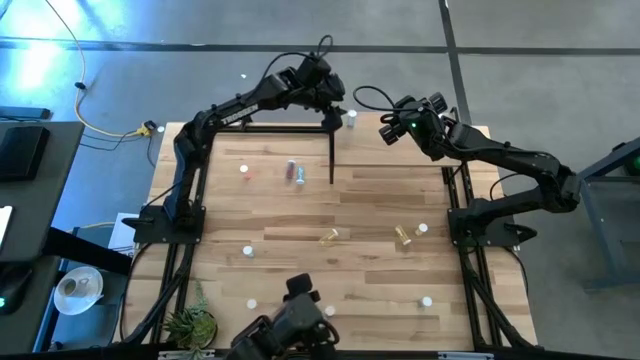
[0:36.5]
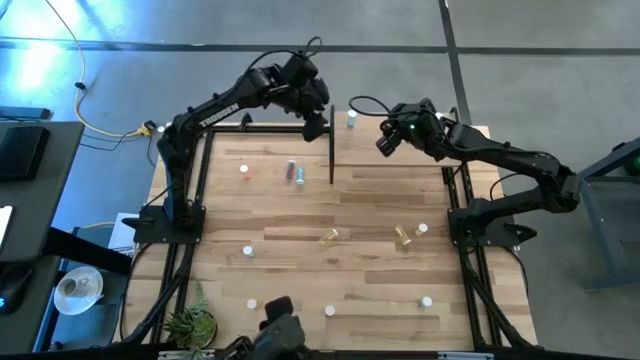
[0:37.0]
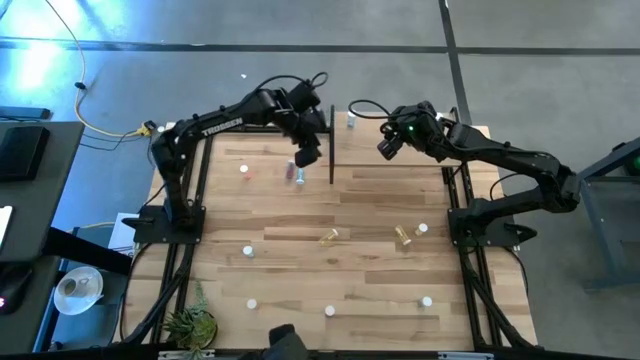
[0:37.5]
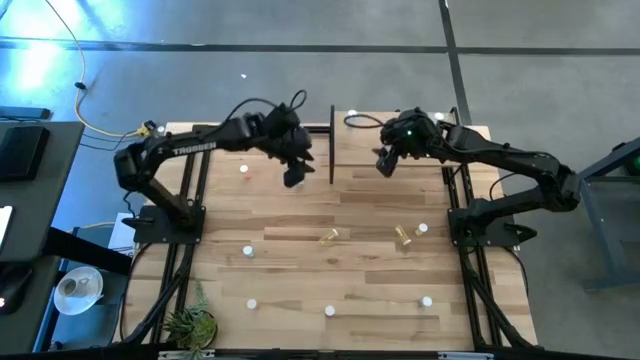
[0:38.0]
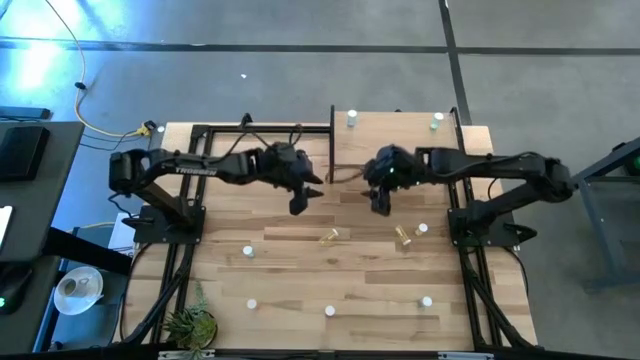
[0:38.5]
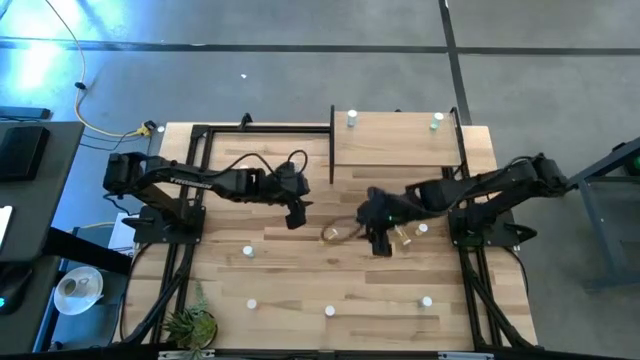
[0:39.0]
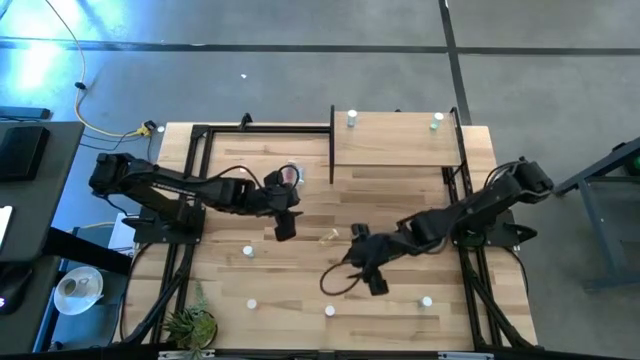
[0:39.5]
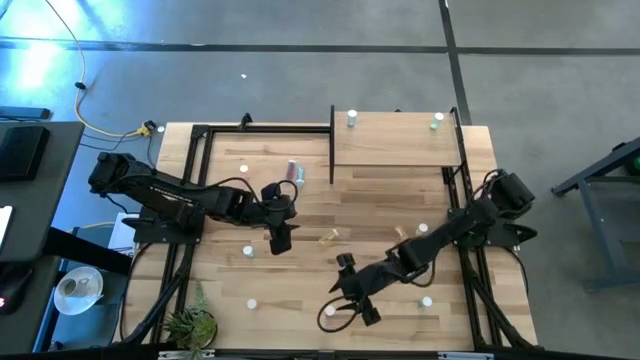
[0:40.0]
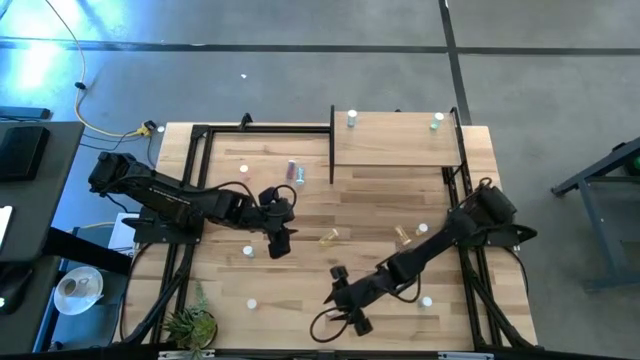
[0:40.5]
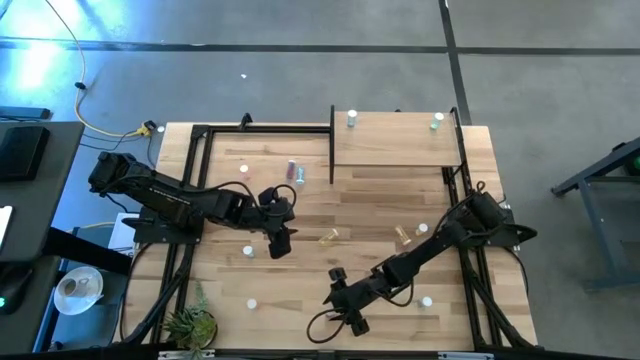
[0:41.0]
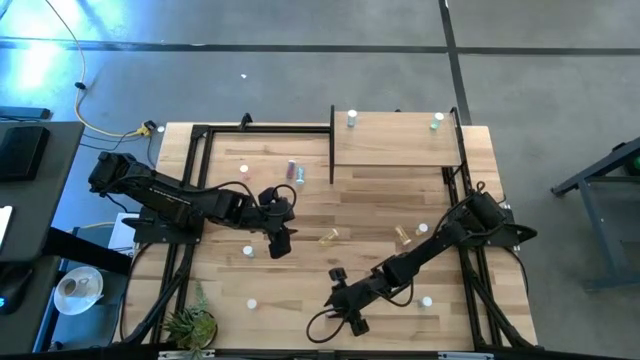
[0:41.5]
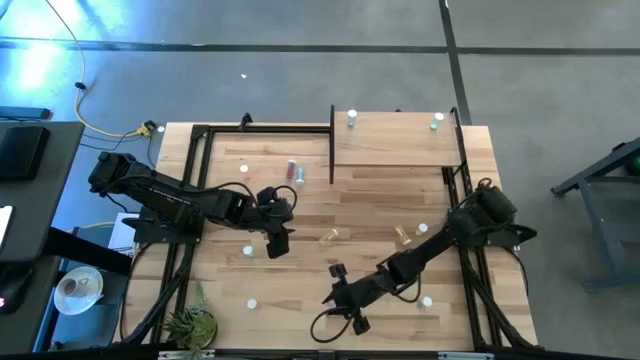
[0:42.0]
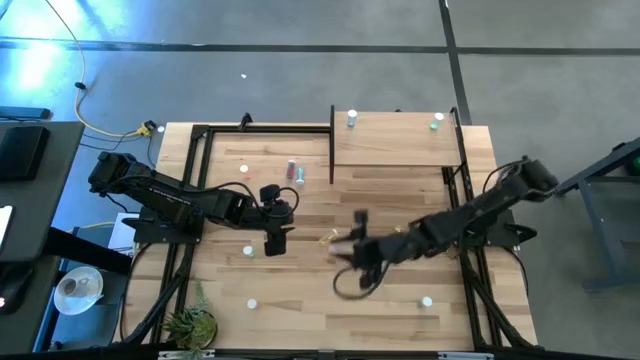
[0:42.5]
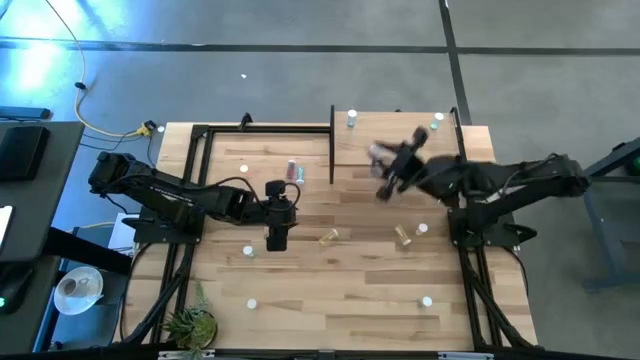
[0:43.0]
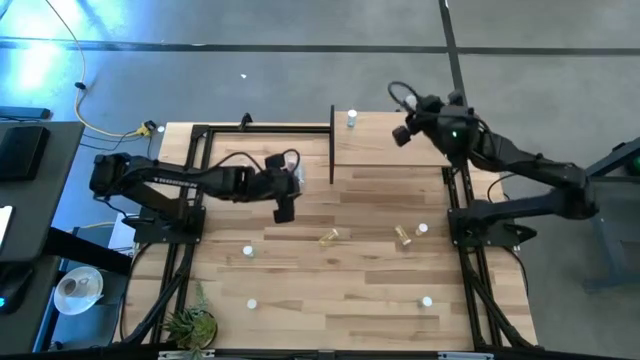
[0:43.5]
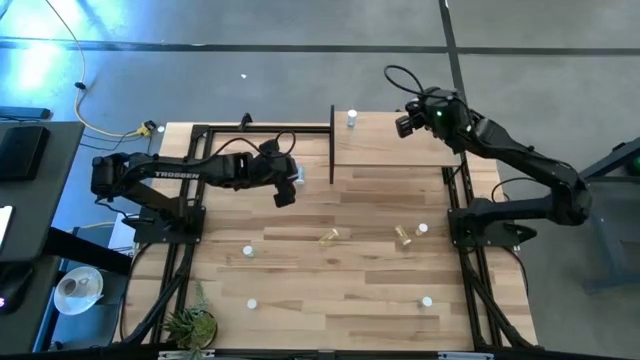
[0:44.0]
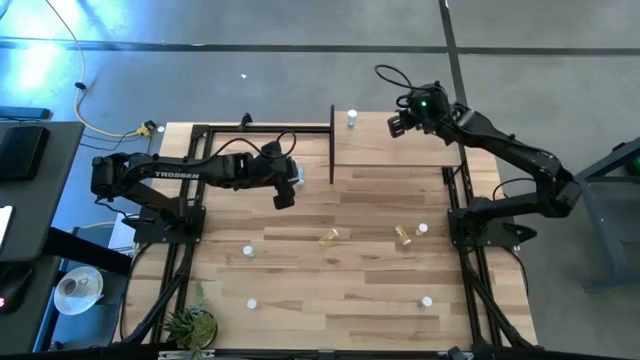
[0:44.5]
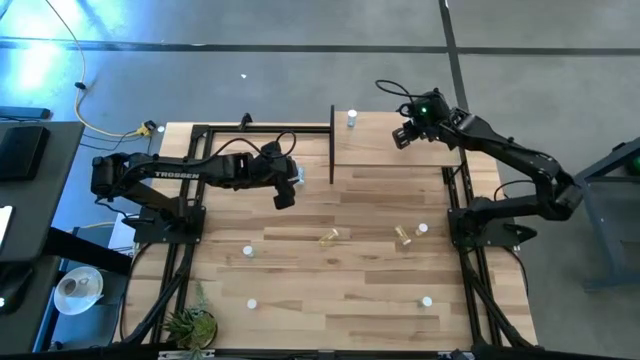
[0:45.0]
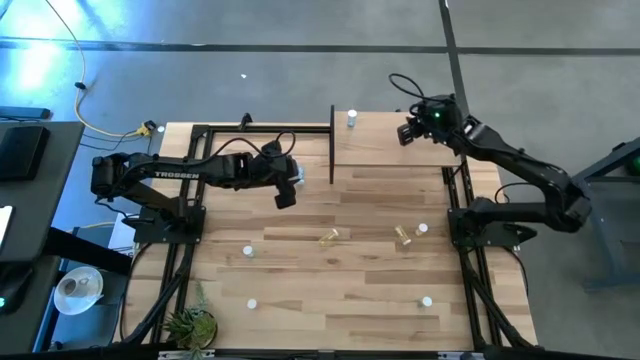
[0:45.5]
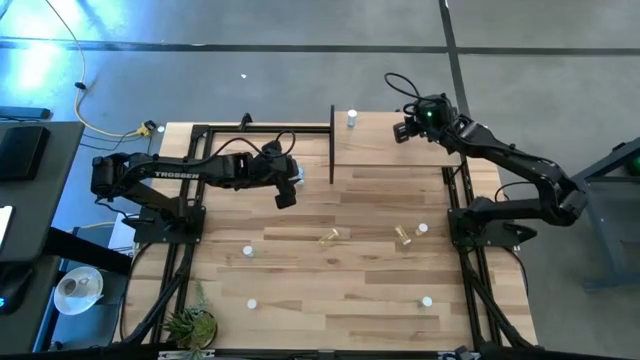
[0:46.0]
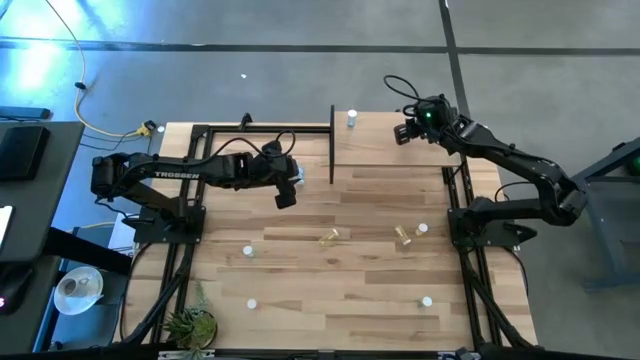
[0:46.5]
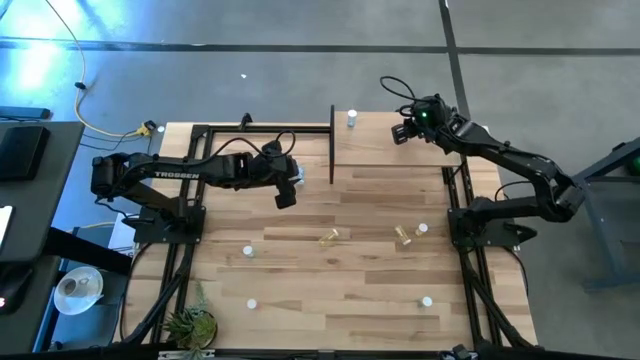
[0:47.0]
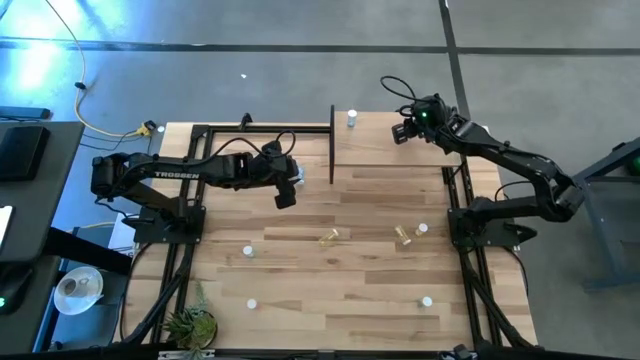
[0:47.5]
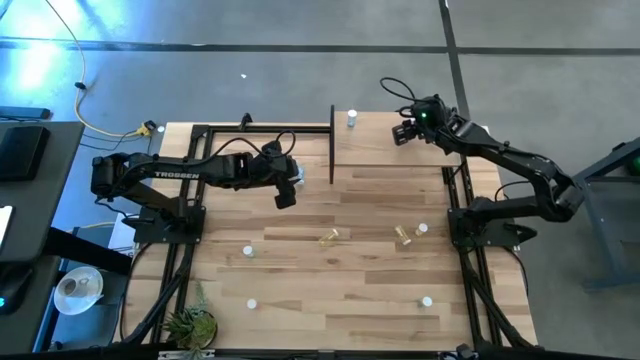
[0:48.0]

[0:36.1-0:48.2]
Task: Pick and place medicine bottles onto shelf by color
Put the right pink medicine bottle on the shelf

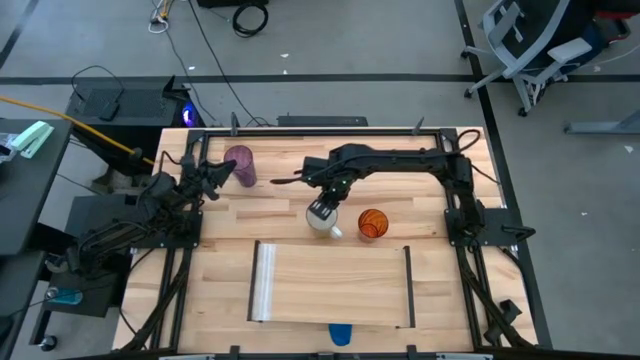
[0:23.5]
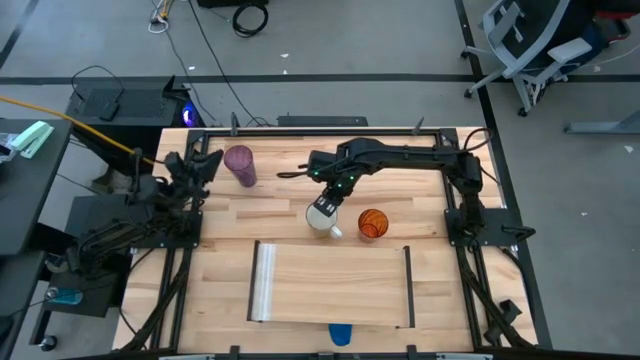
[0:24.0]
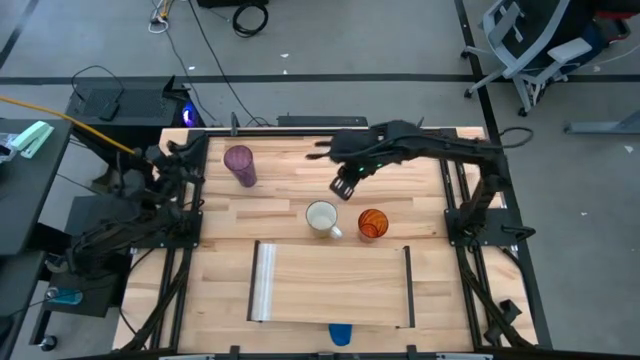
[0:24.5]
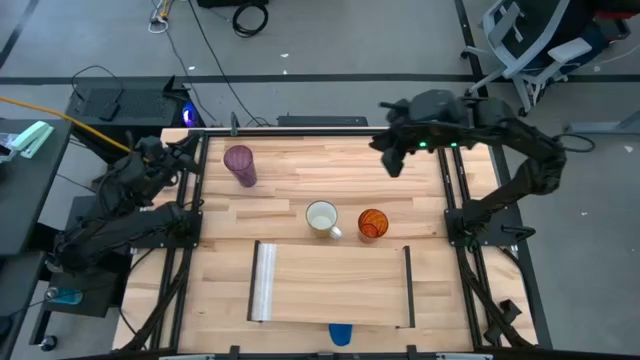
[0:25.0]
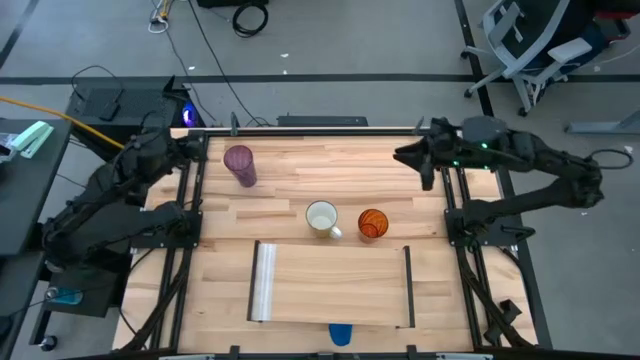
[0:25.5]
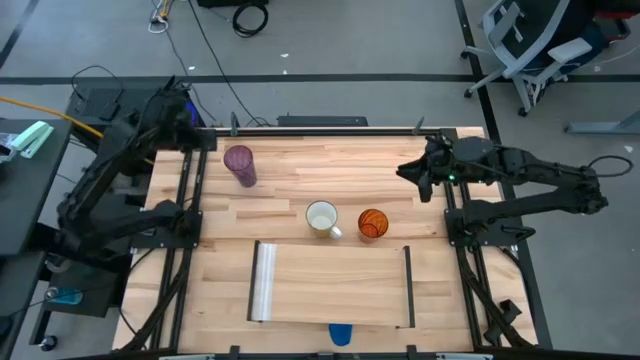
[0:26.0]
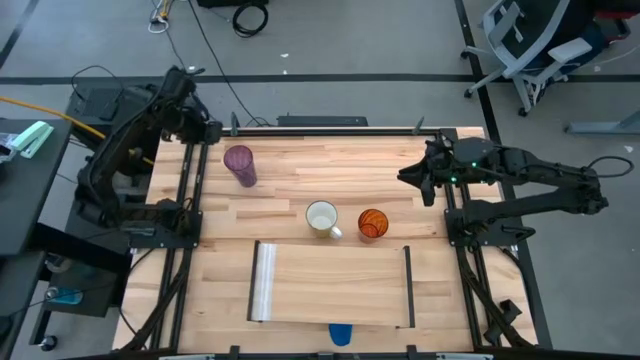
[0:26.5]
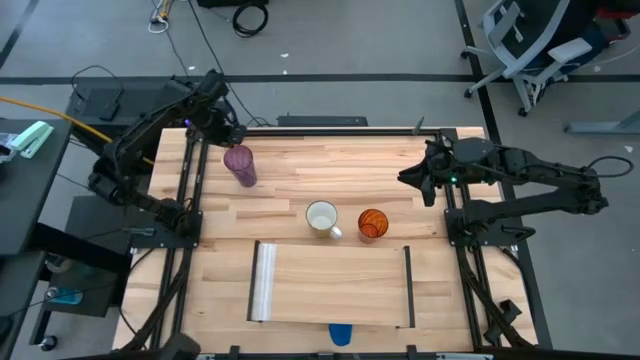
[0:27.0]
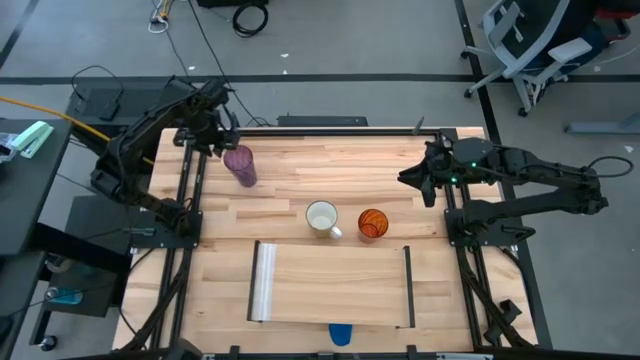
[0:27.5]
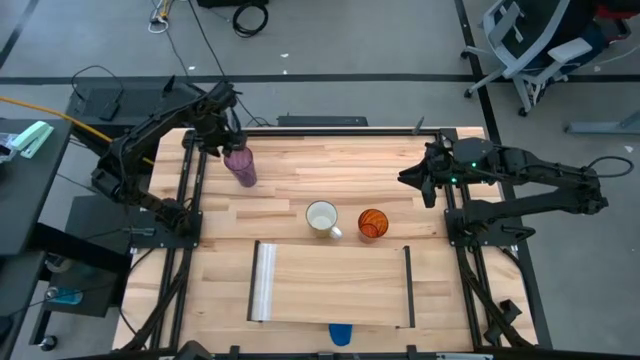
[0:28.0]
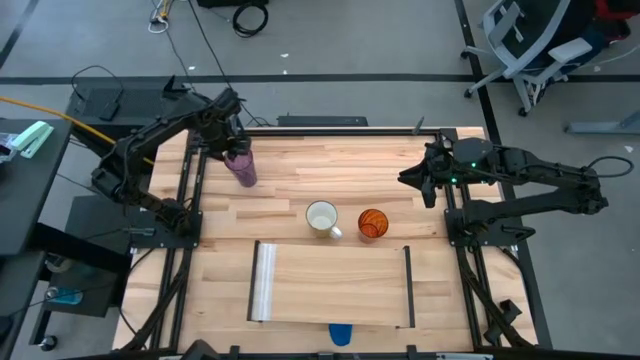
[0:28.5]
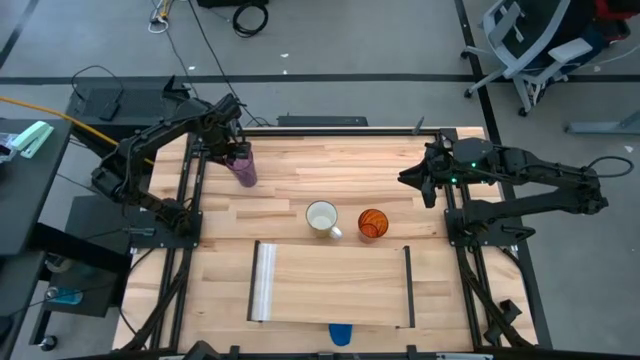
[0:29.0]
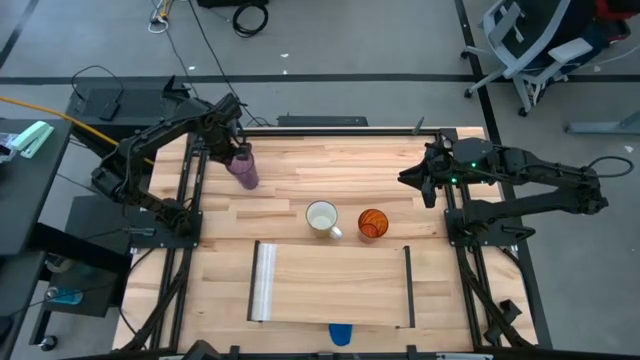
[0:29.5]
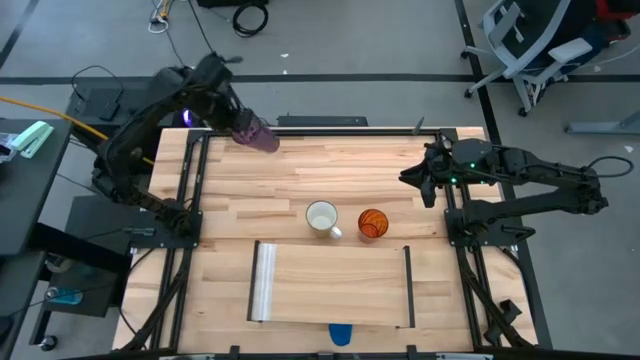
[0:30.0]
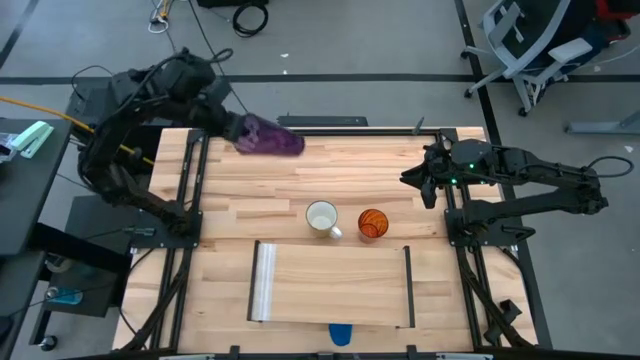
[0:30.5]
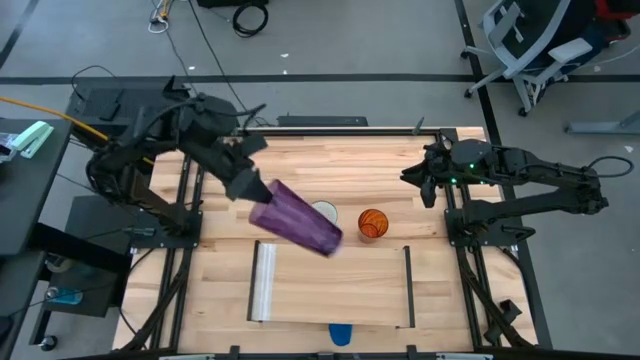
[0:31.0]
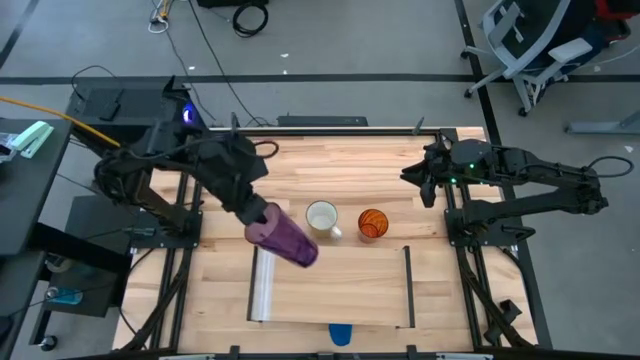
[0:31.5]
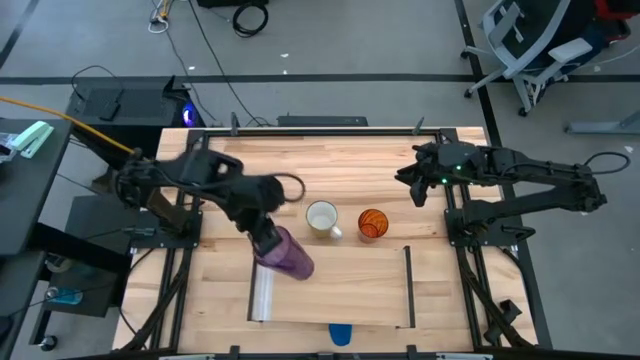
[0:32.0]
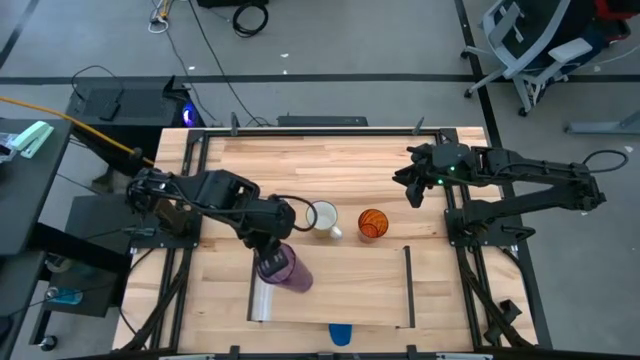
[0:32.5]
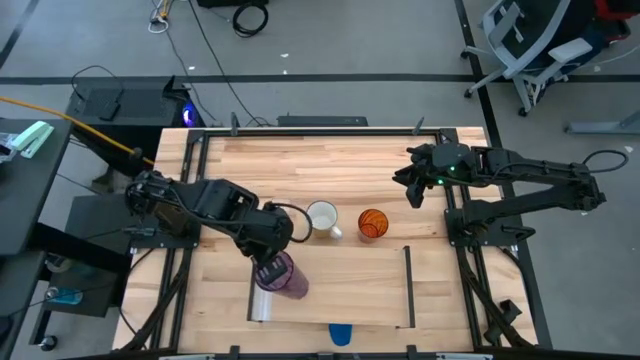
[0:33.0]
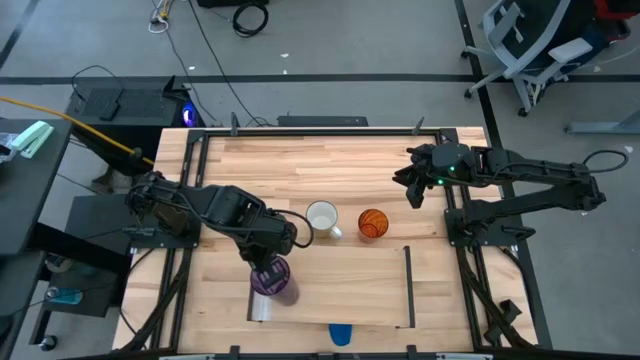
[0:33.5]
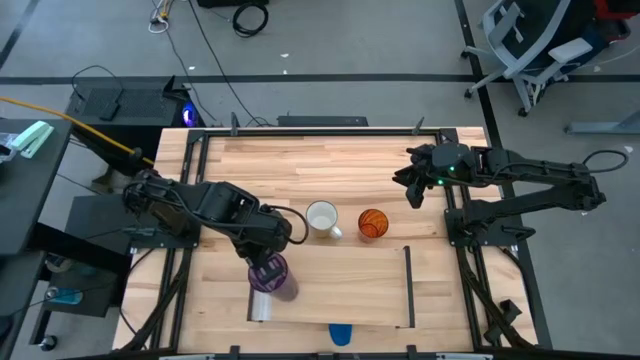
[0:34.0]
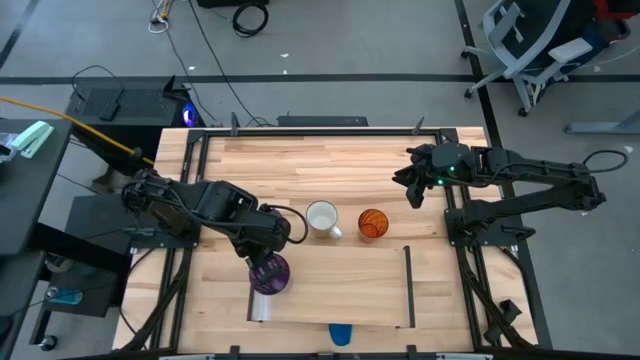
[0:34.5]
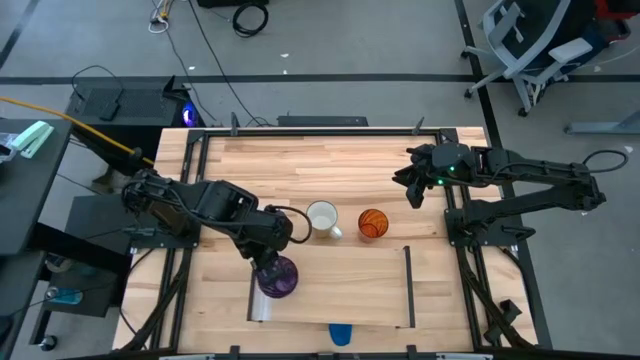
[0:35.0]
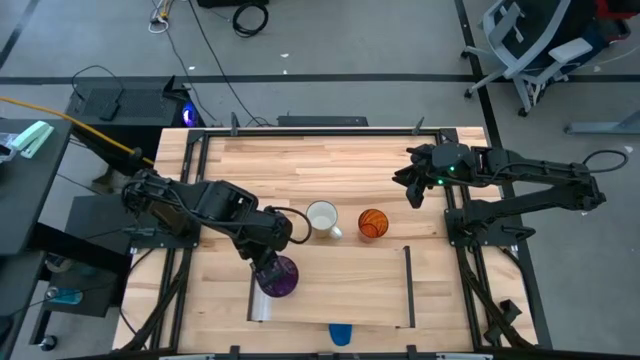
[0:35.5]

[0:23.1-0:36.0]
Task: Stack small to large cups/mugs on shelf
Put the purple cup on the shelf
